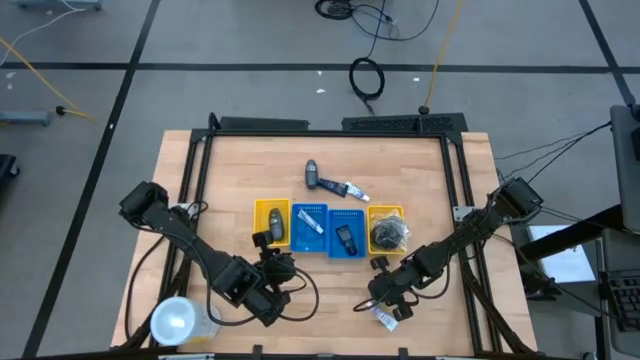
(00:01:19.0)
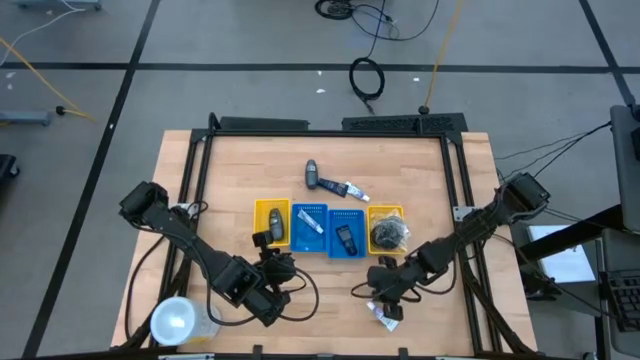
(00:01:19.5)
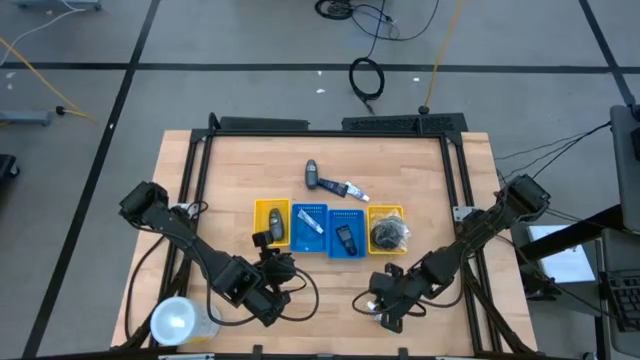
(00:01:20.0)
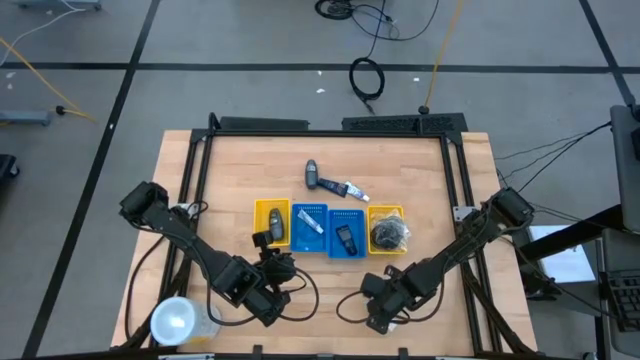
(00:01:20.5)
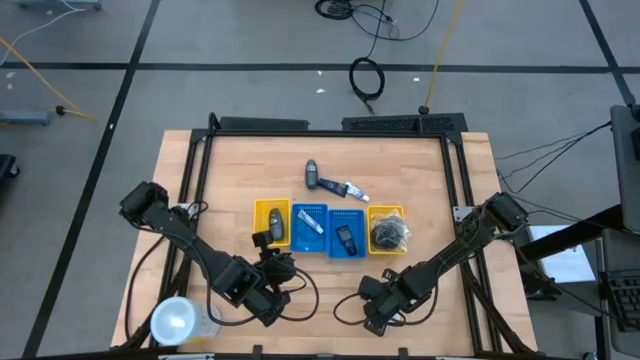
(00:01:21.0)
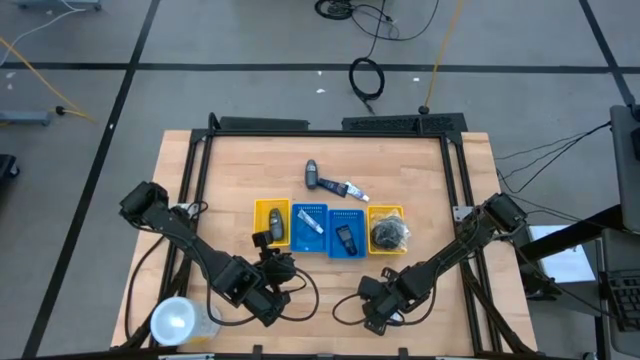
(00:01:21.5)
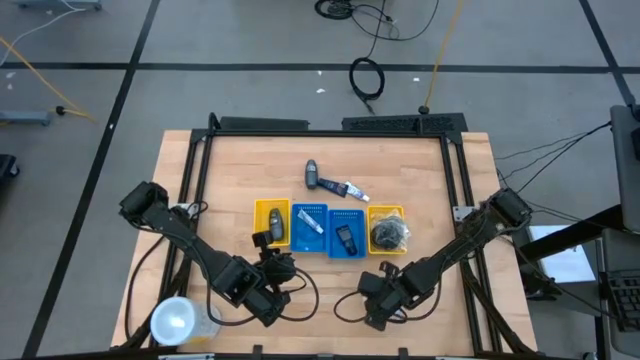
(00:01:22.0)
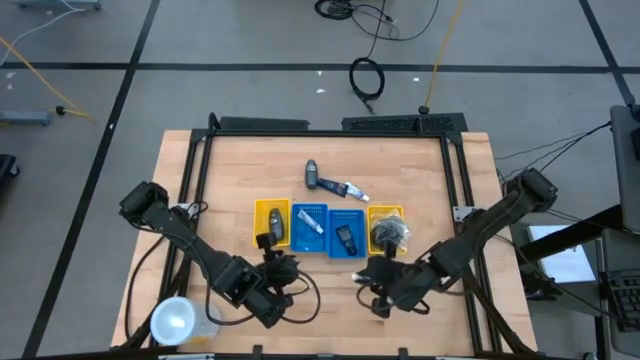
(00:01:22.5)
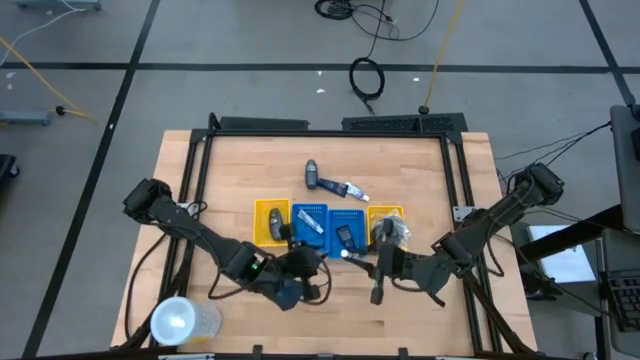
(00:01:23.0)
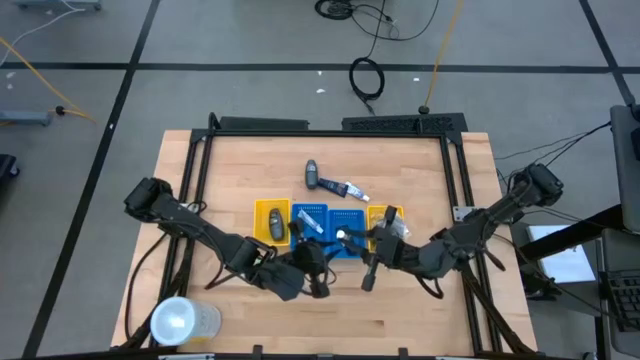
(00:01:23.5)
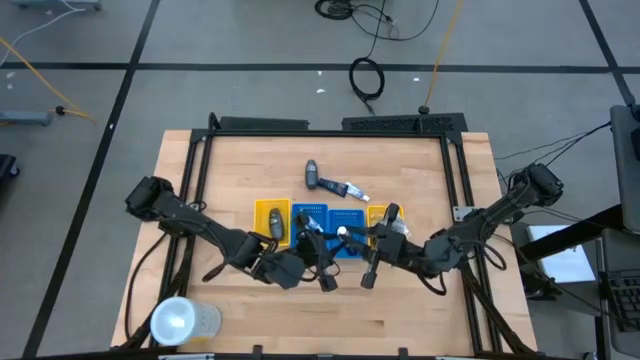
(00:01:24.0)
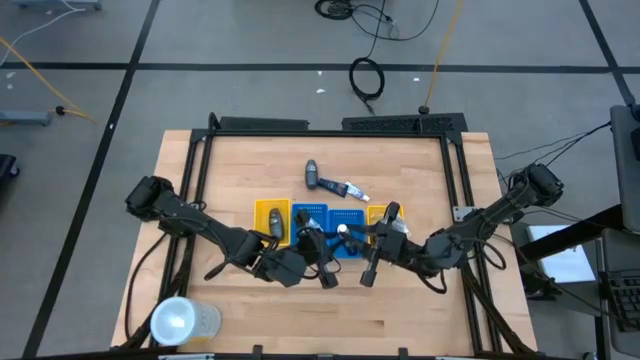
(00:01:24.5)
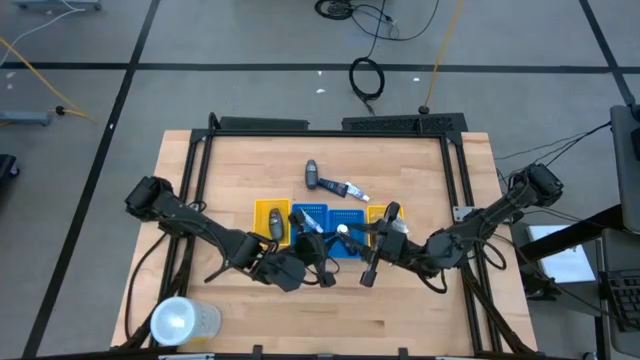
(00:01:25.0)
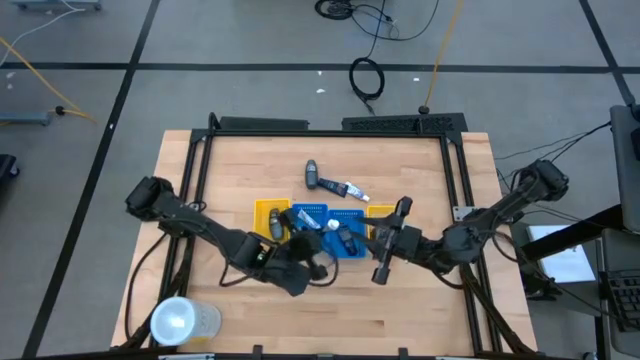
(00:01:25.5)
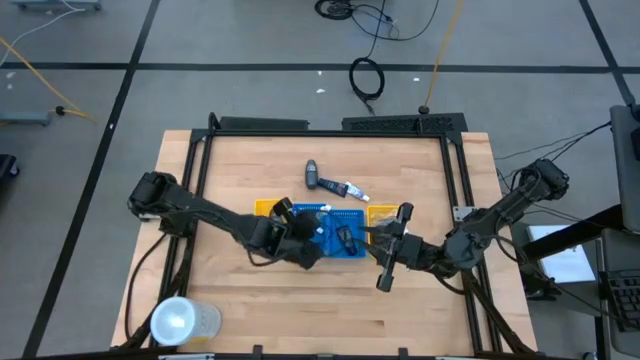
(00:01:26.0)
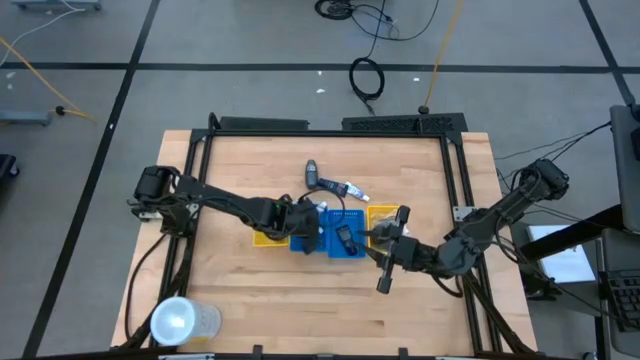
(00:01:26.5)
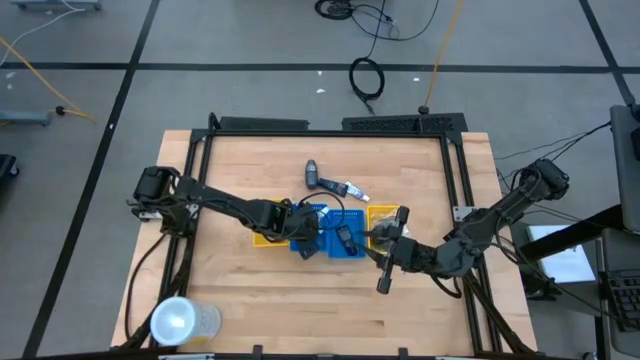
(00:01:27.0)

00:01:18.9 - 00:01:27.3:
Task: Pick & Place Travel size toiletries
Put the white toothpaste into the left blue basket

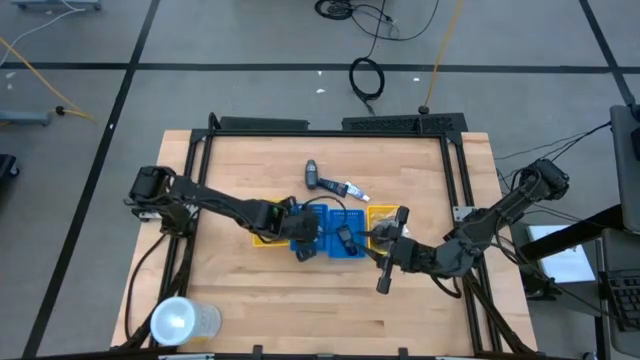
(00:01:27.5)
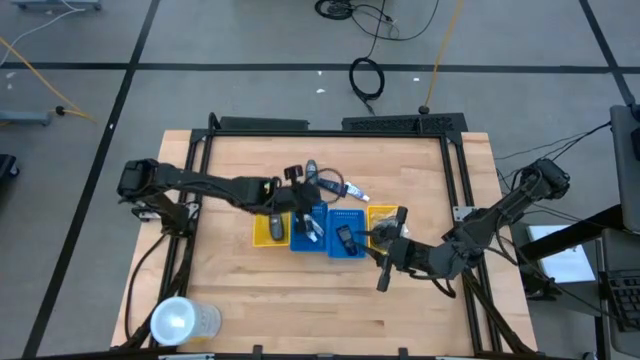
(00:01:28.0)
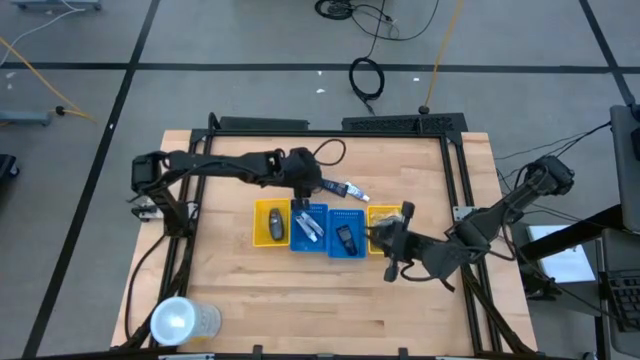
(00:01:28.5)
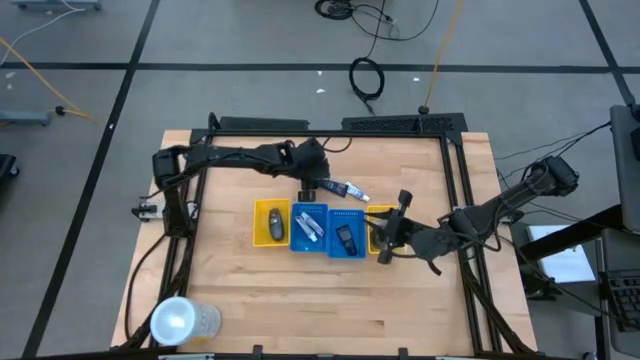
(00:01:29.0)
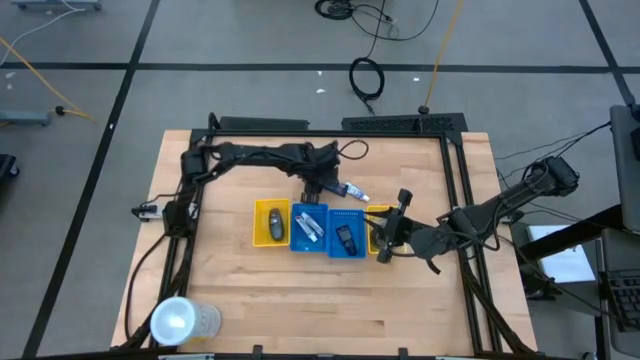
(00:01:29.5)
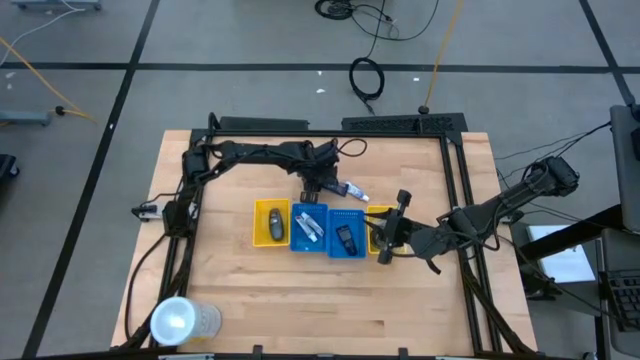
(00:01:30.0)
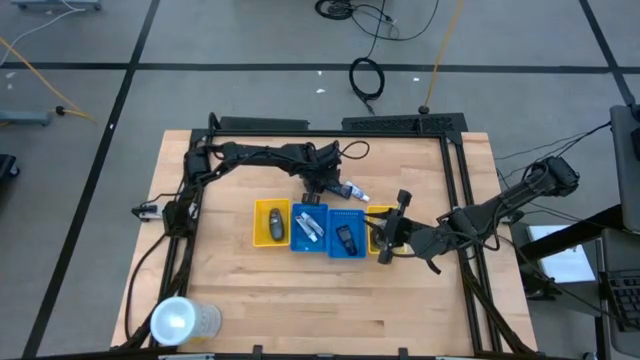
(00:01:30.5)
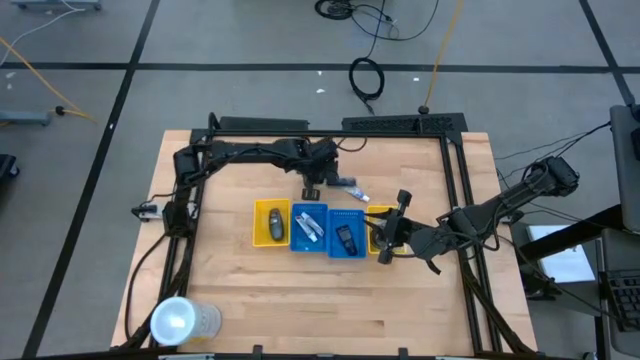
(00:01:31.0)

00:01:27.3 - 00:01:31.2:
Put the blue shaving cream into the right blue basket

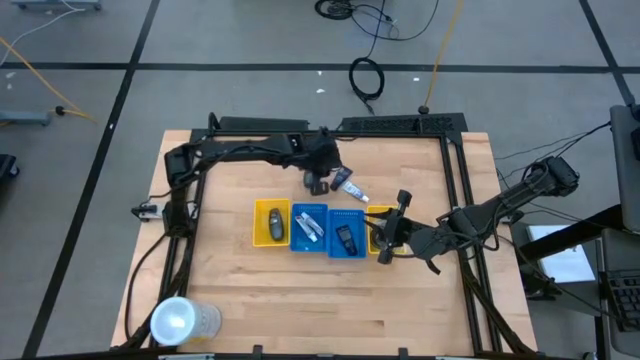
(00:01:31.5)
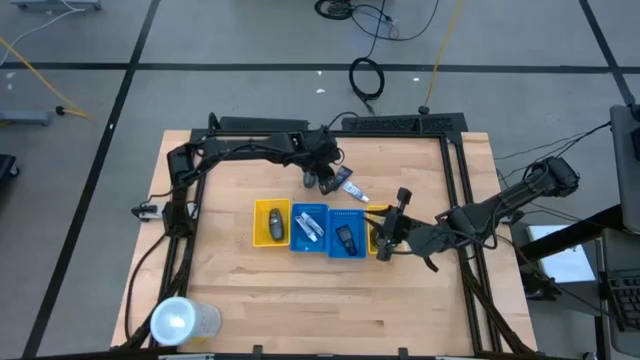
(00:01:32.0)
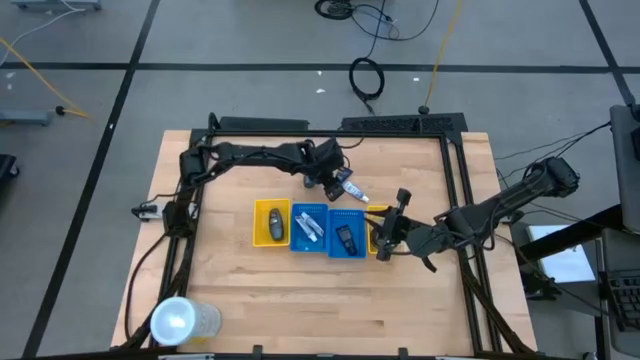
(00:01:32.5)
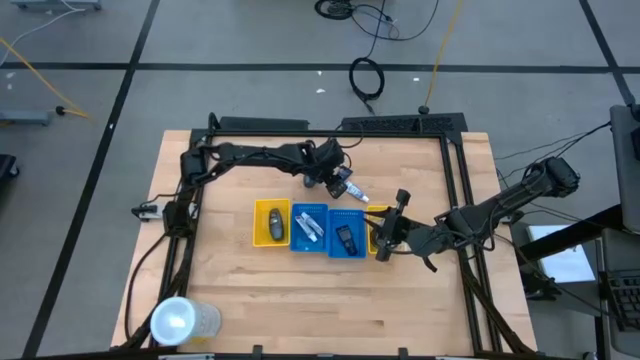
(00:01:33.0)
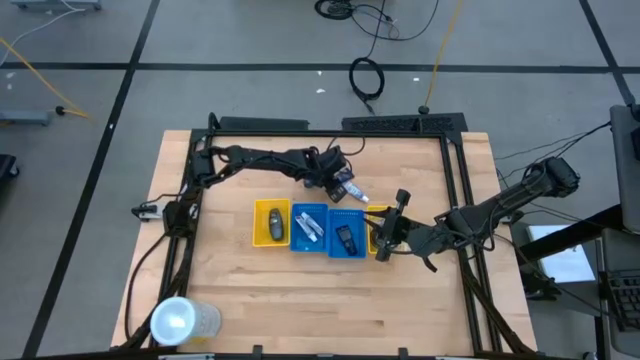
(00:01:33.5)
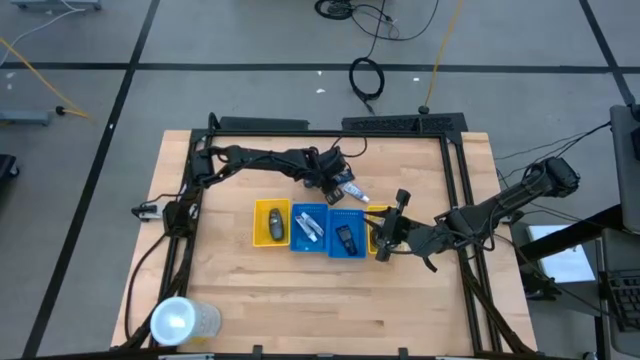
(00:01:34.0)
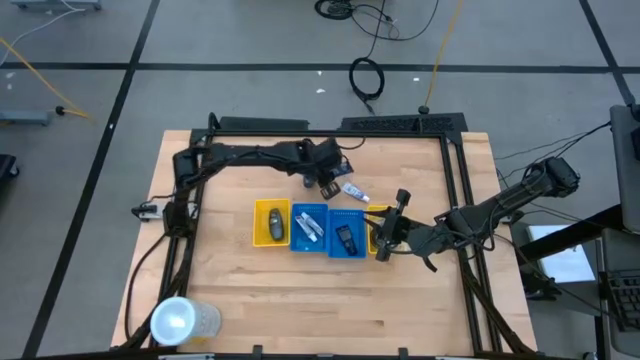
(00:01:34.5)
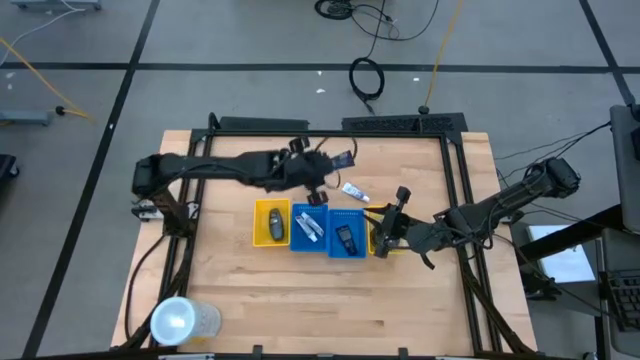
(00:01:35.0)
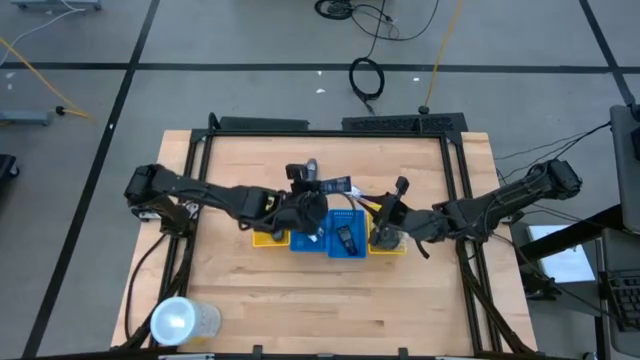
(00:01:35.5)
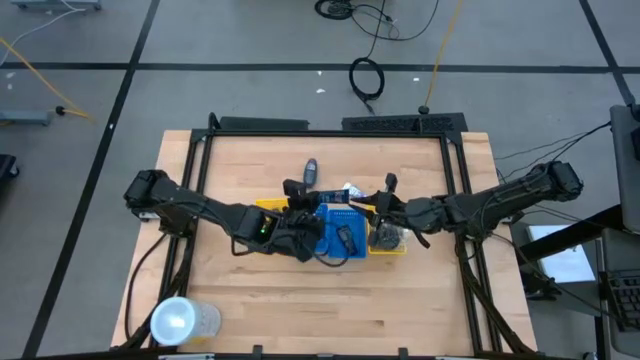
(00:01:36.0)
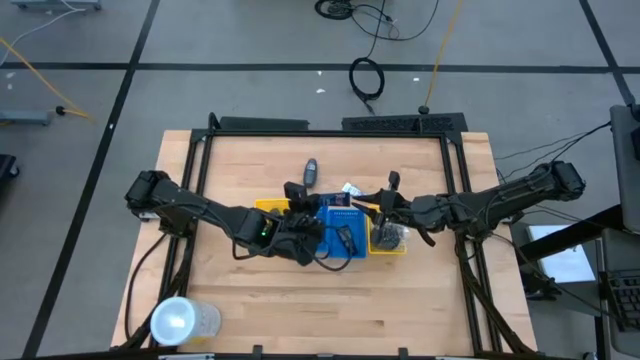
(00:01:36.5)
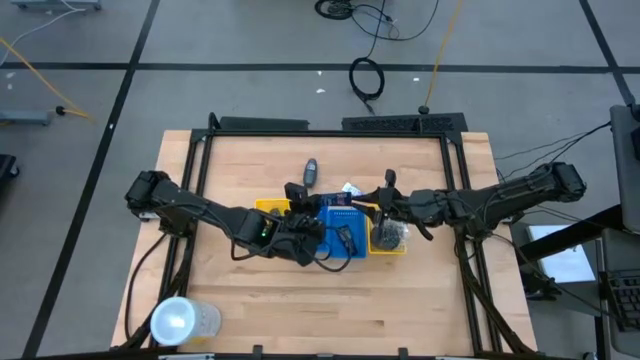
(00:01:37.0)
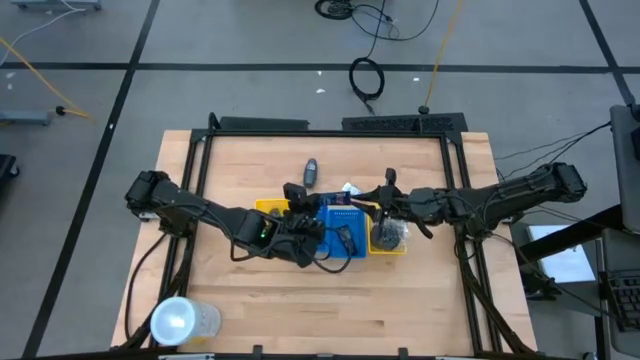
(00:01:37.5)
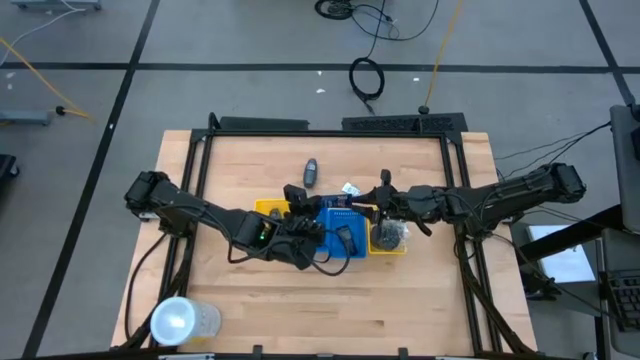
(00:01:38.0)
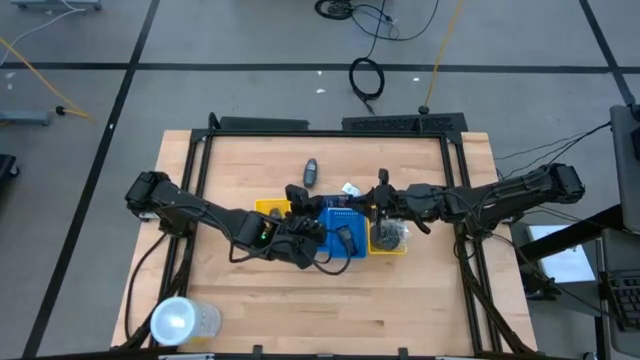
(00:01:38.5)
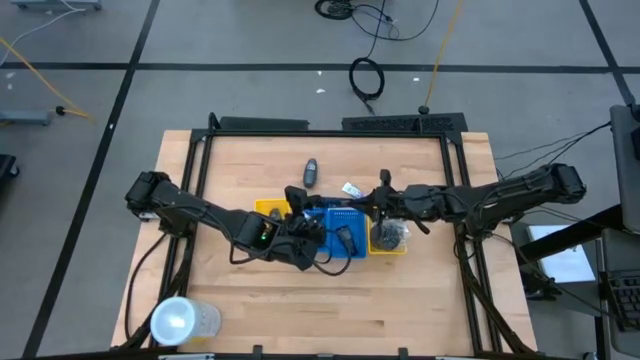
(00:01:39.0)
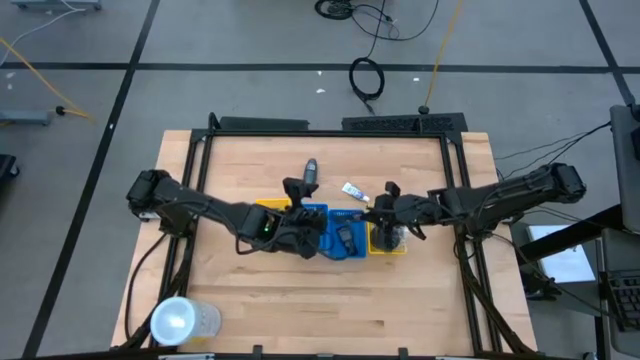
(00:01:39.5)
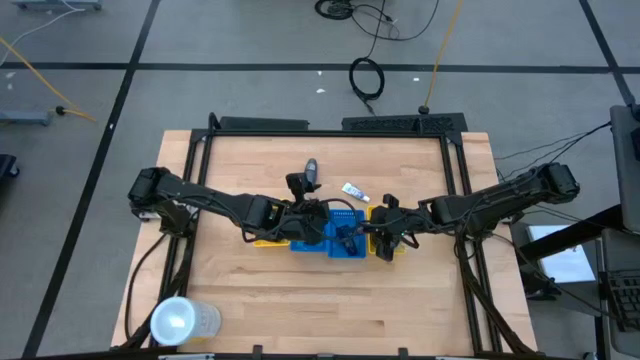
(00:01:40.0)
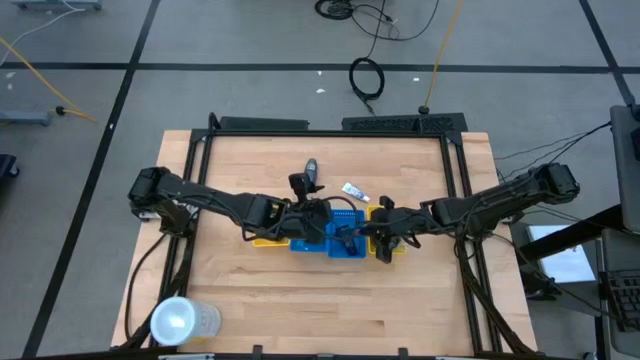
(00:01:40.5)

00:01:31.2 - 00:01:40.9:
Put the blue shaving cream into the right blue basket

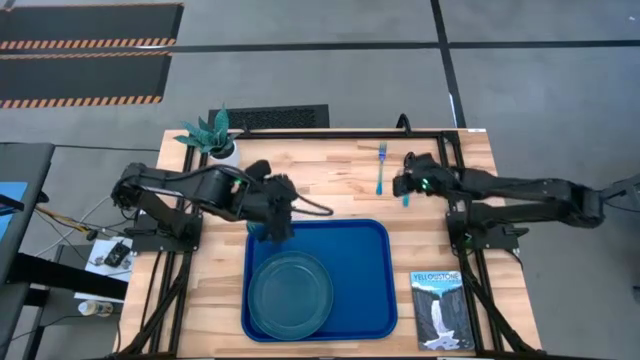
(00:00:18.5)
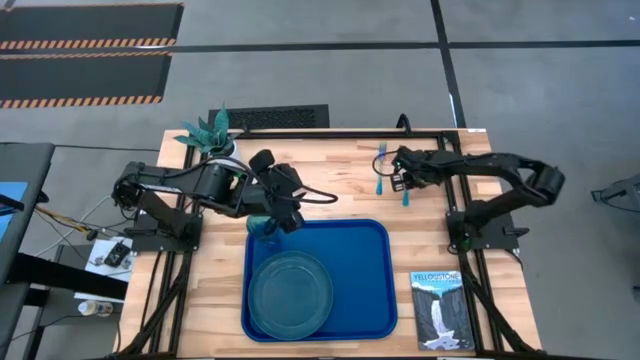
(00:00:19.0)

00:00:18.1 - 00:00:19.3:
Task: Pick and place plate/cup/fork/spoon on tray
Put the blue spoon on the blue serving tray to the right of the blue plate
